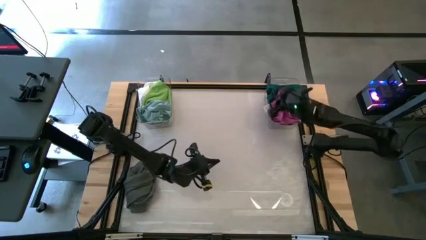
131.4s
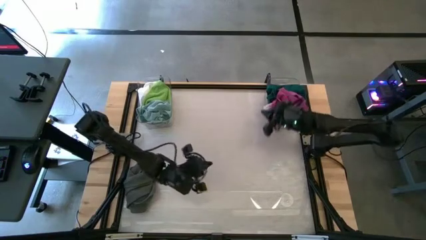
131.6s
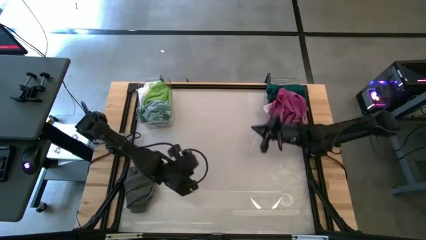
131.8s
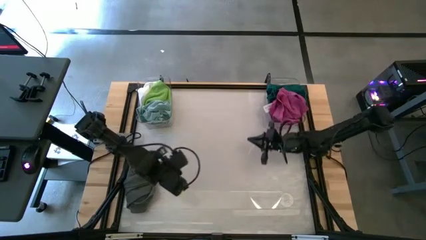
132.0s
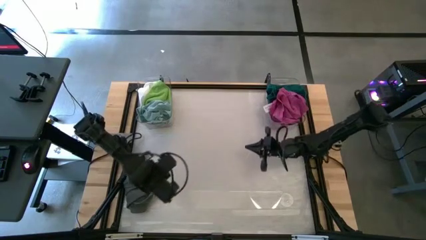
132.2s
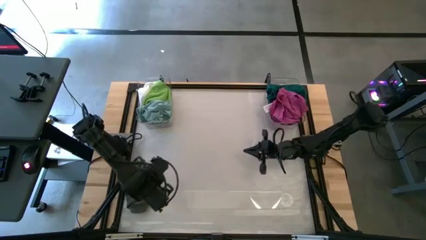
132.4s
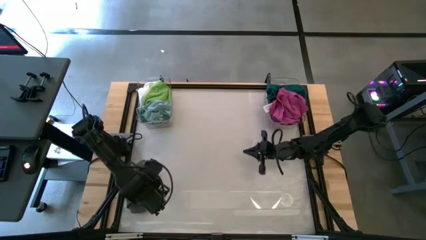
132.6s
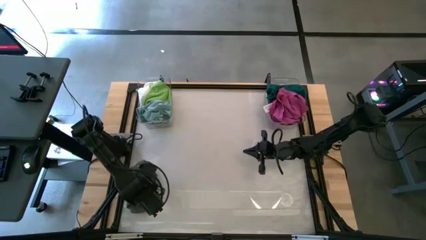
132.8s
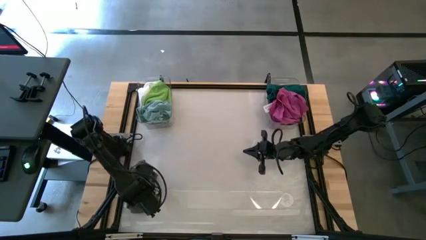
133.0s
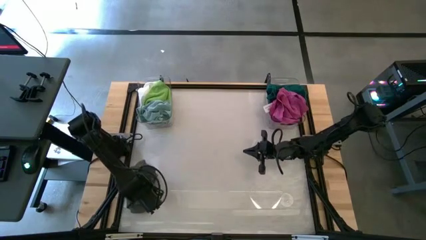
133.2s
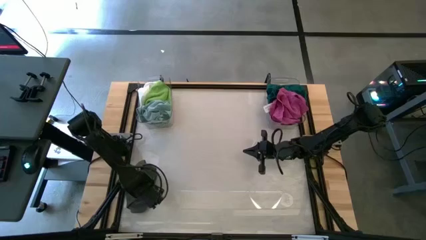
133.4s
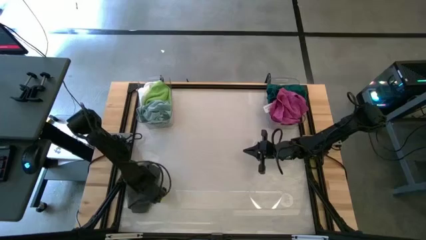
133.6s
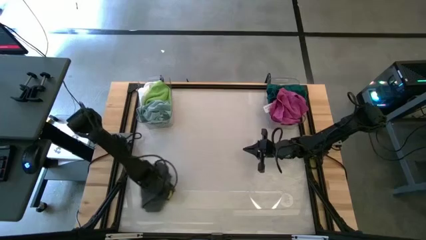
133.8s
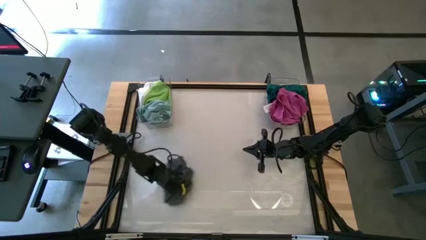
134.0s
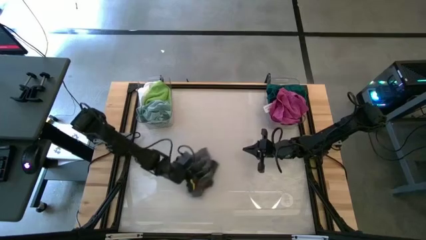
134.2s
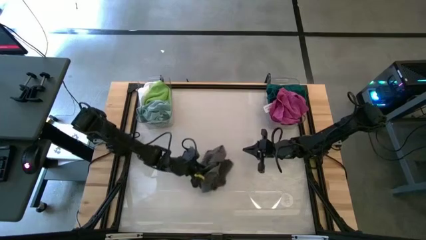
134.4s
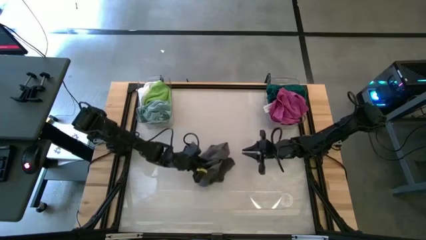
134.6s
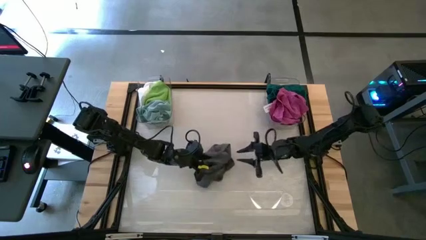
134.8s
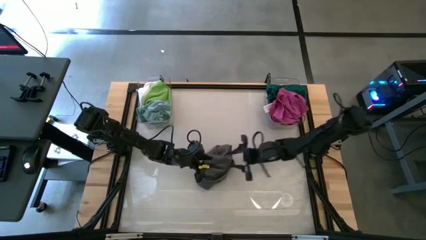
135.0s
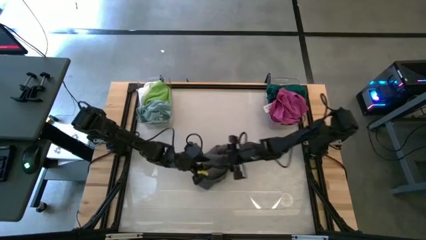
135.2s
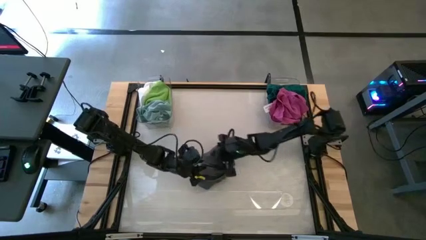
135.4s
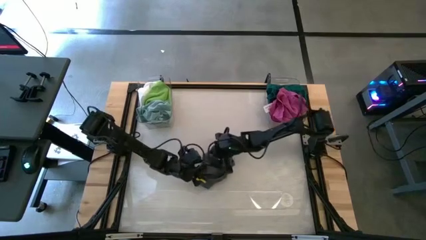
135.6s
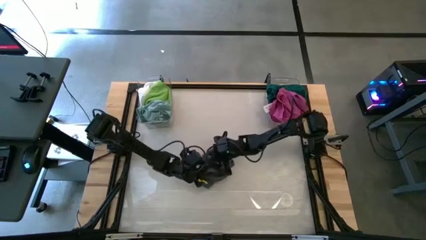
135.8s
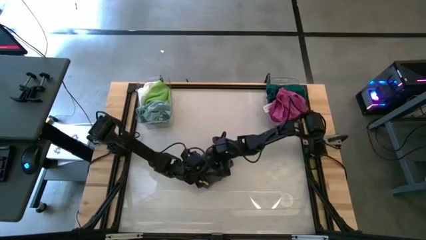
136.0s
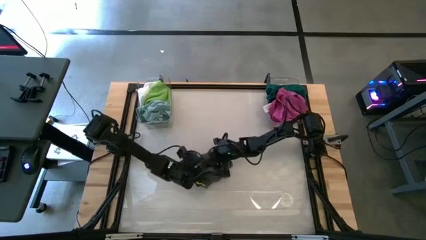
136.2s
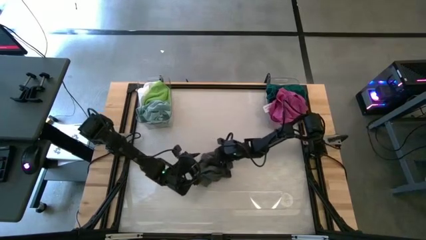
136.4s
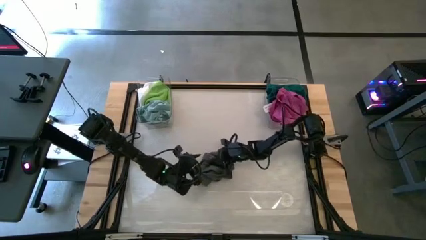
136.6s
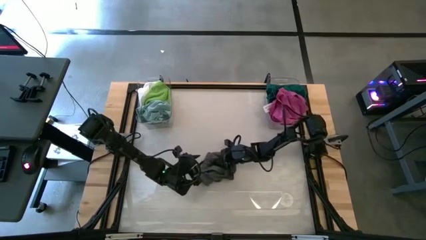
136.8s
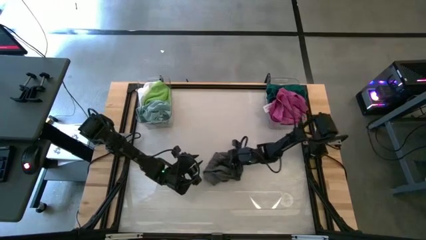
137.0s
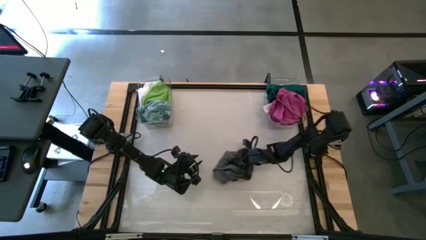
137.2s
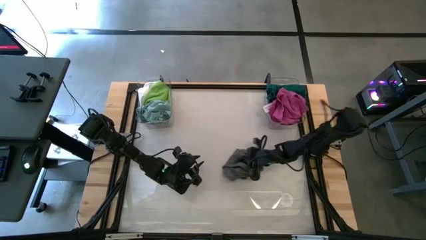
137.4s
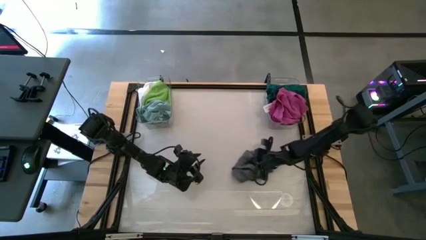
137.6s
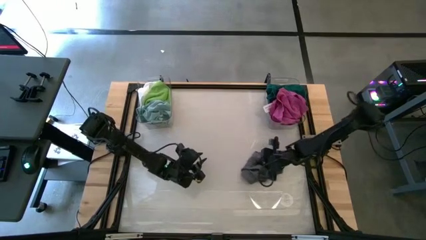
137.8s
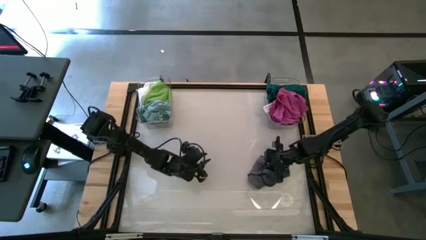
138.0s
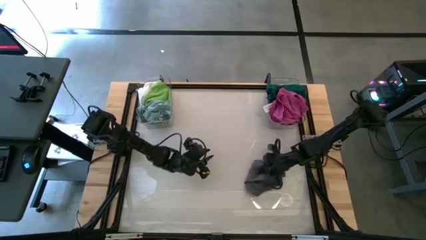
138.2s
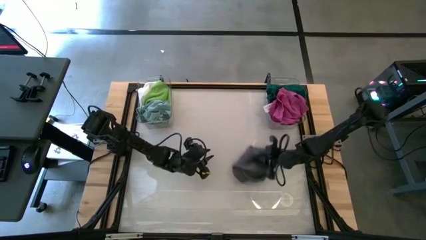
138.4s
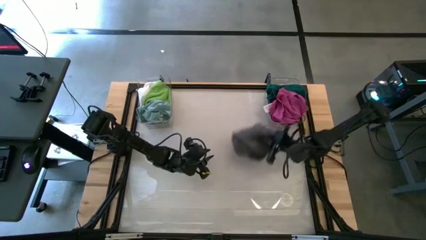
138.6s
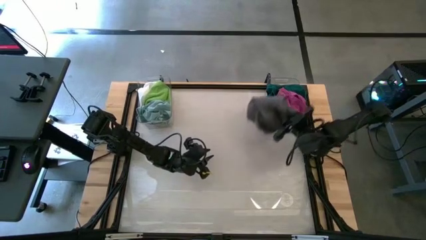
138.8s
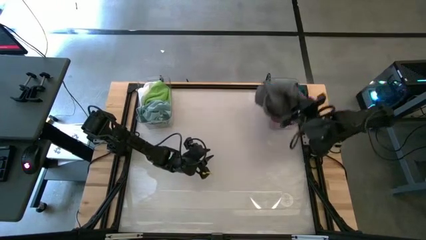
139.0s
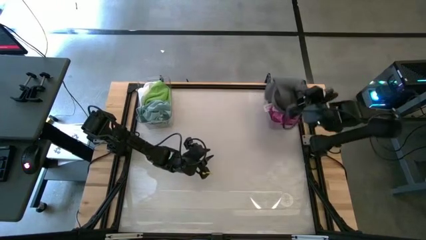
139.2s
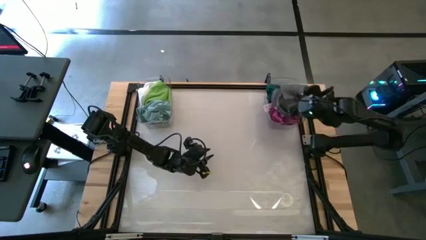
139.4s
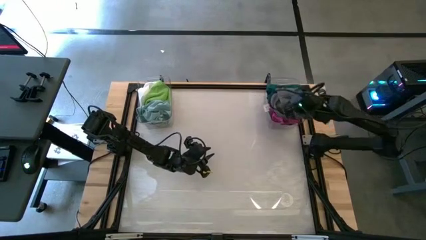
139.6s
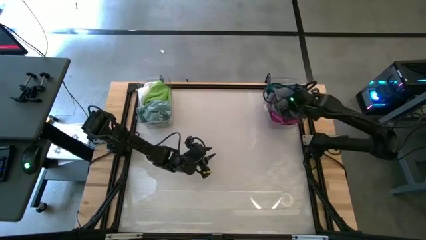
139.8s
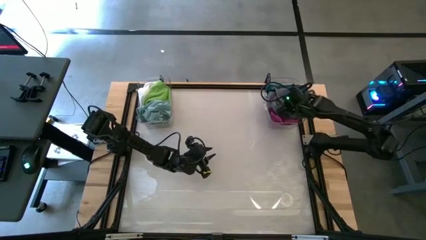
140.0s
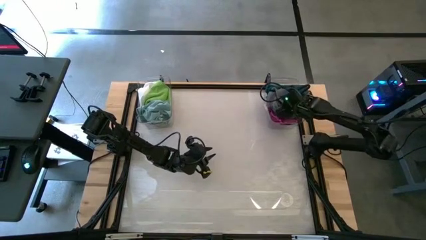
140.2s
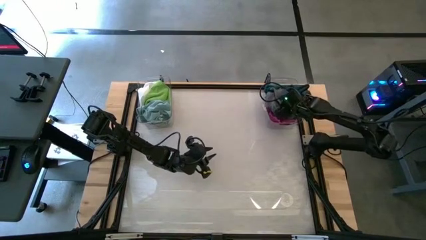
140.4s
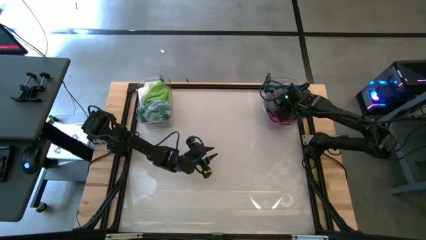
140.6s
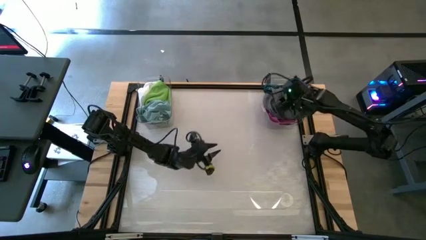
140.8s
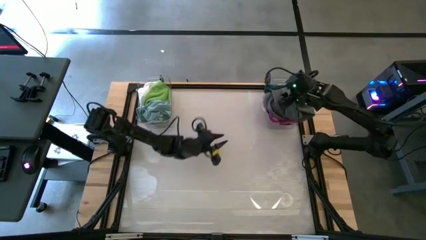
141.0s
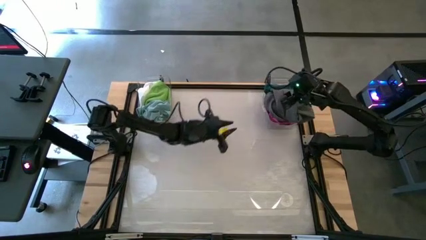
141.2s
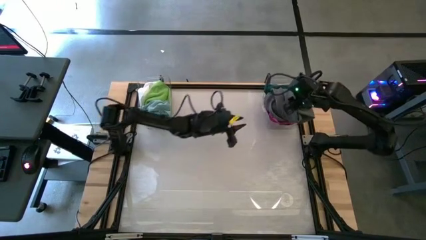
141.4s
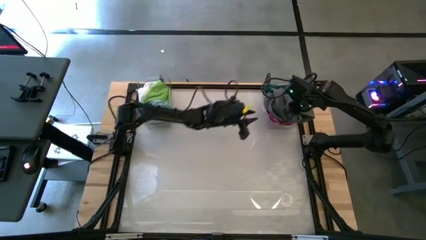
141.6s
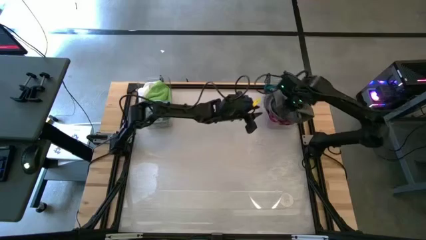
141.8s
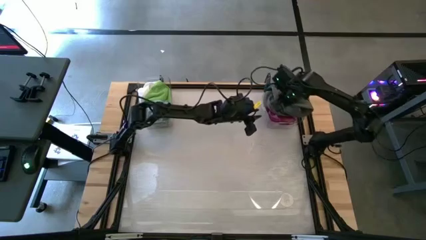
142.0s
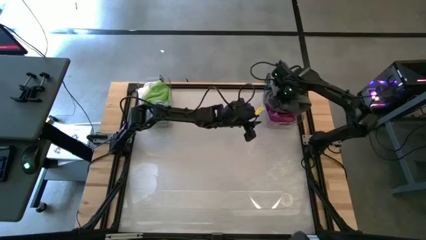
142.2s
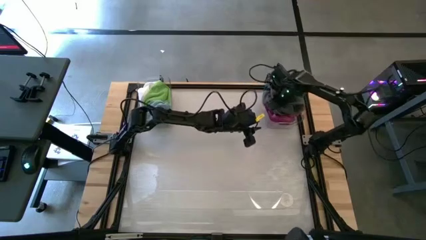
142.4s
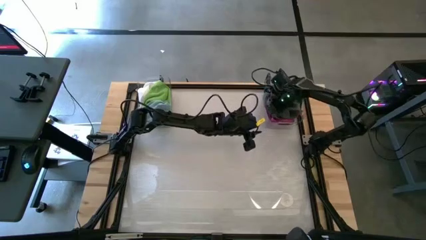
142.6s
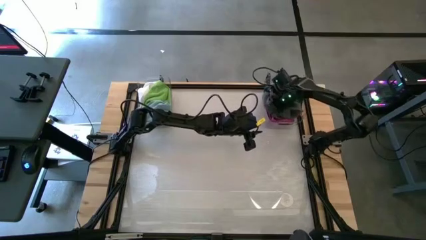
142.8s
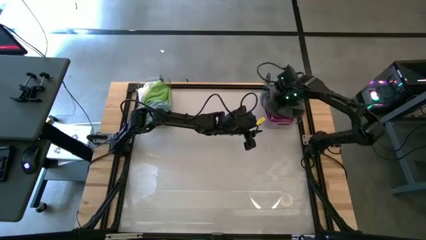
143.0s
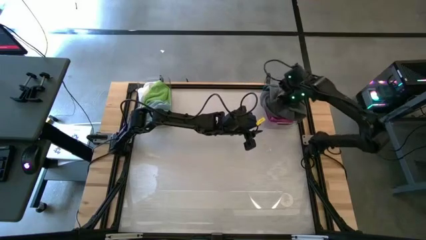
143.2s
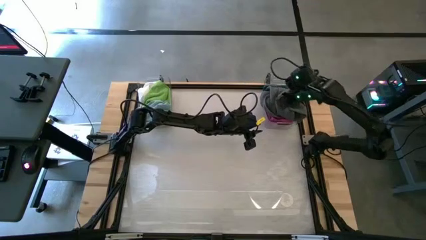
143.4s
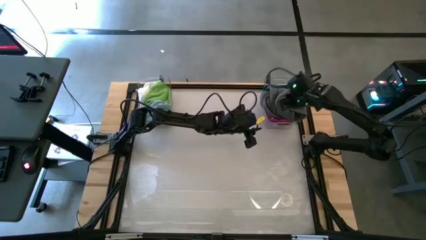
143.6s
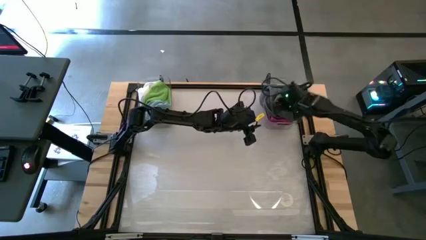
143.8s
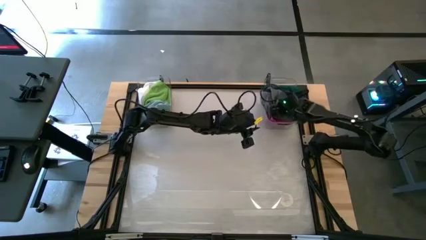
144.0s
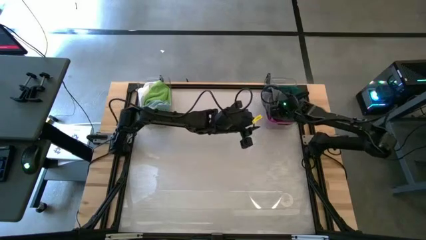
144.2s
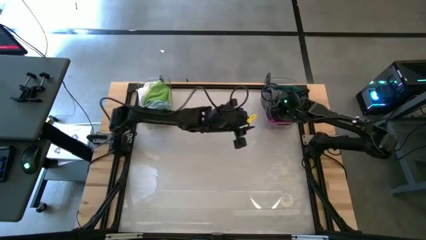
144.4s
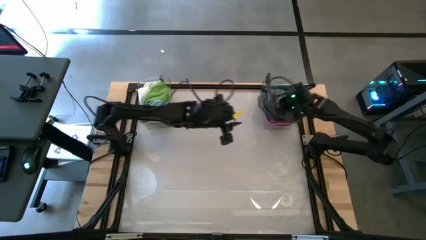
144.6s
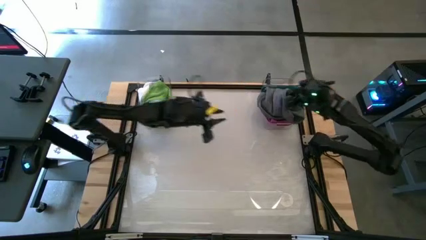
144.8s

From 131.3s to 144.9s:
Task: Sort towels by color in basket
Put the gray towel into the right transparent bin
